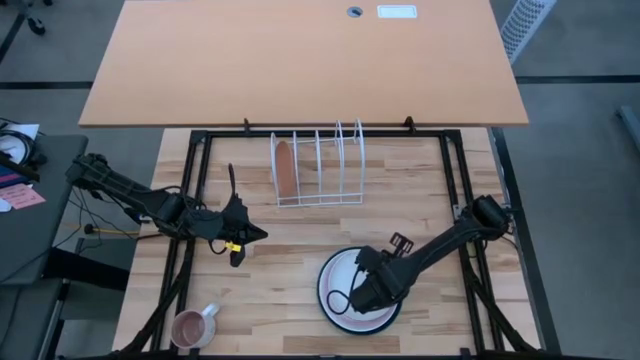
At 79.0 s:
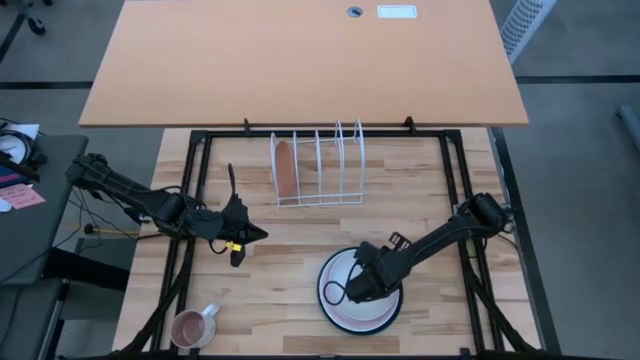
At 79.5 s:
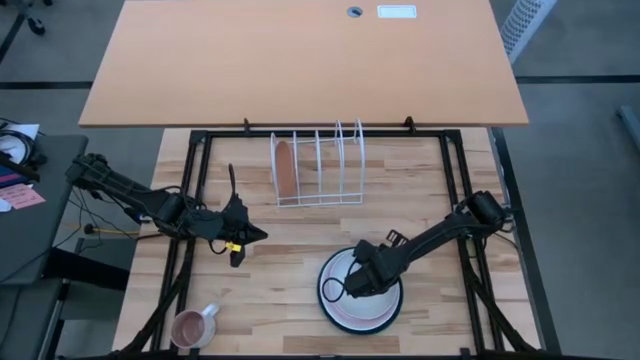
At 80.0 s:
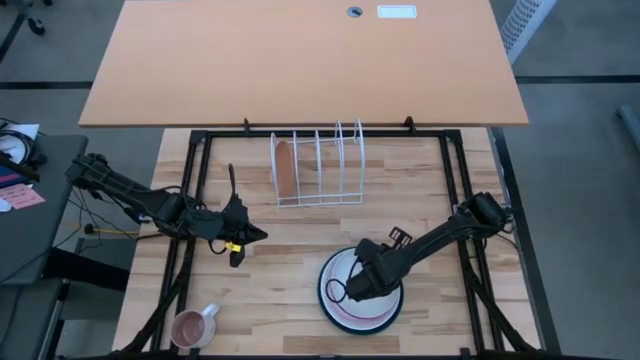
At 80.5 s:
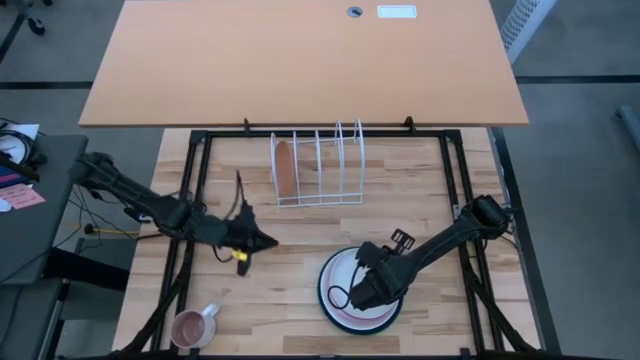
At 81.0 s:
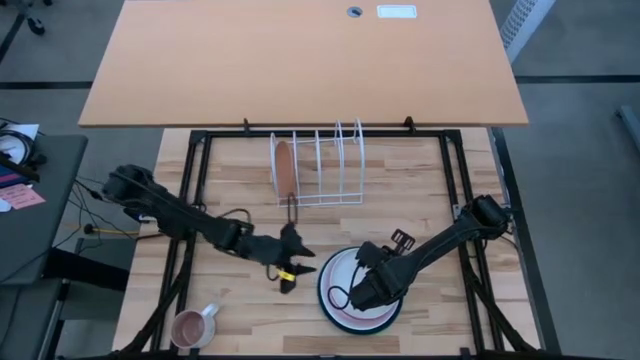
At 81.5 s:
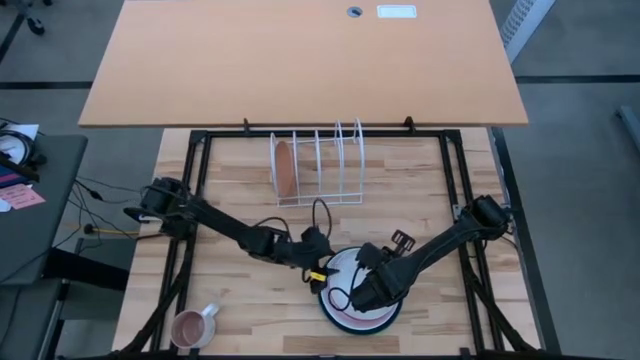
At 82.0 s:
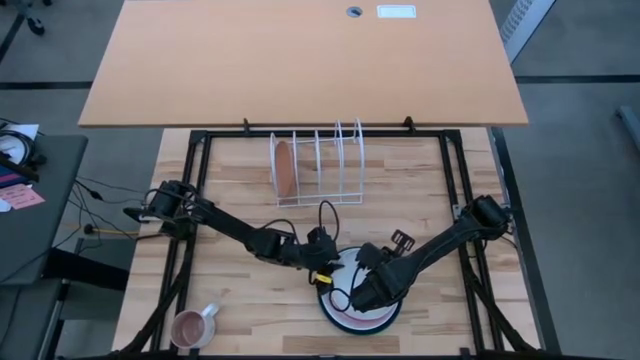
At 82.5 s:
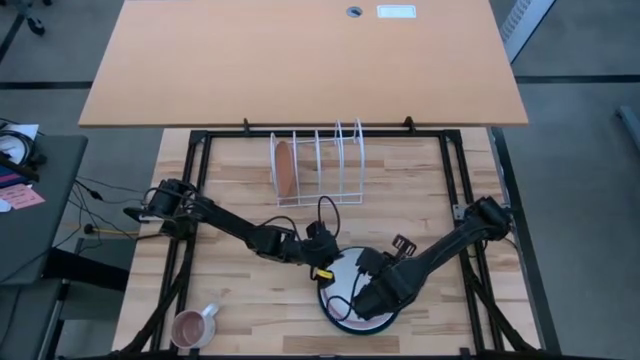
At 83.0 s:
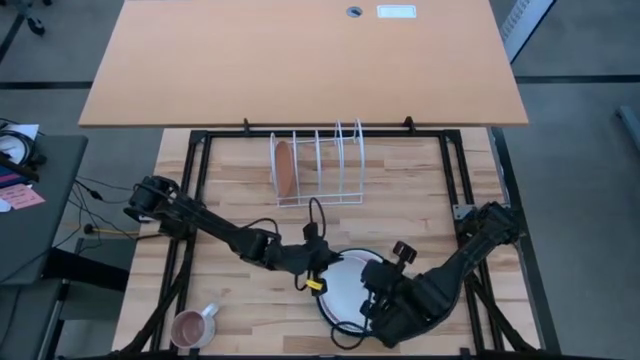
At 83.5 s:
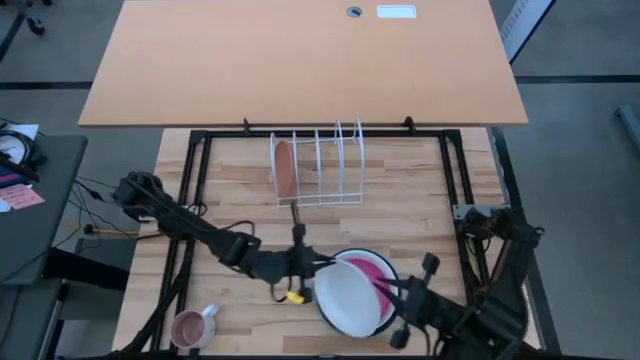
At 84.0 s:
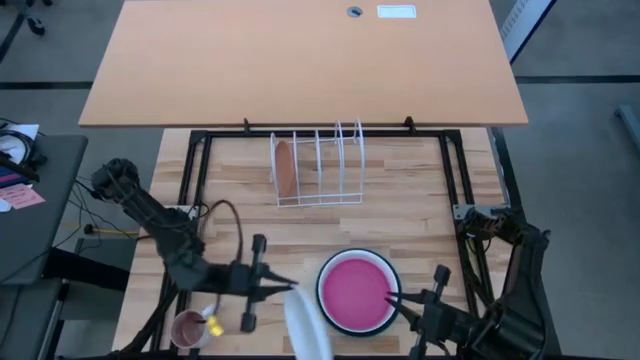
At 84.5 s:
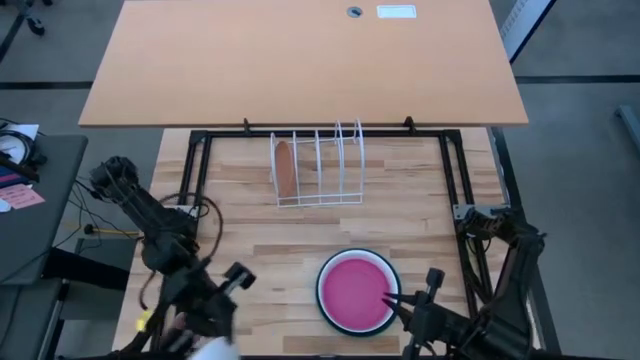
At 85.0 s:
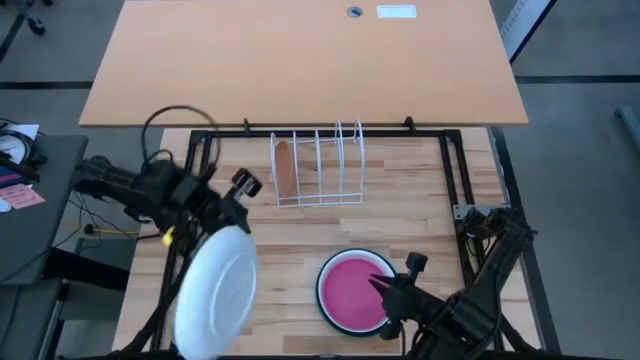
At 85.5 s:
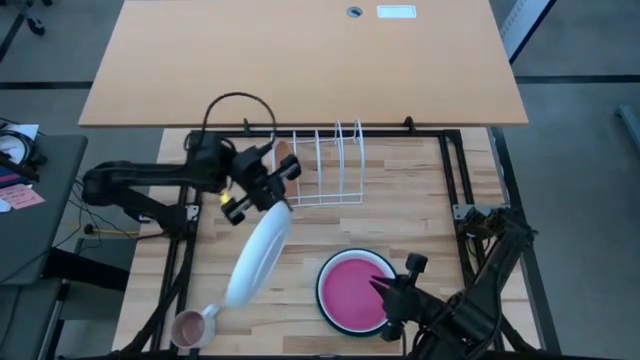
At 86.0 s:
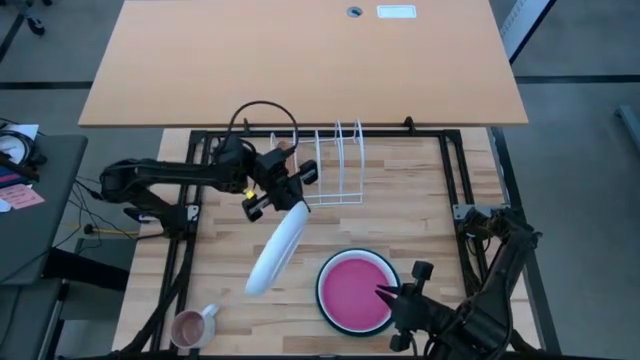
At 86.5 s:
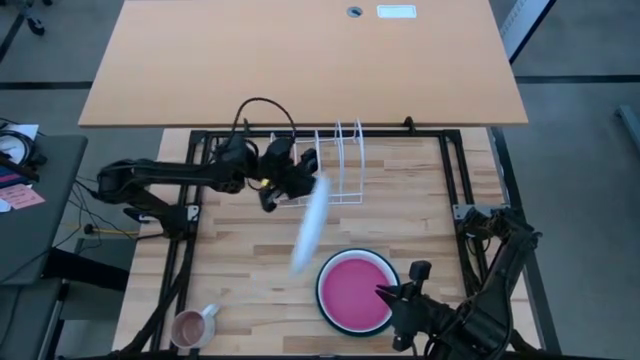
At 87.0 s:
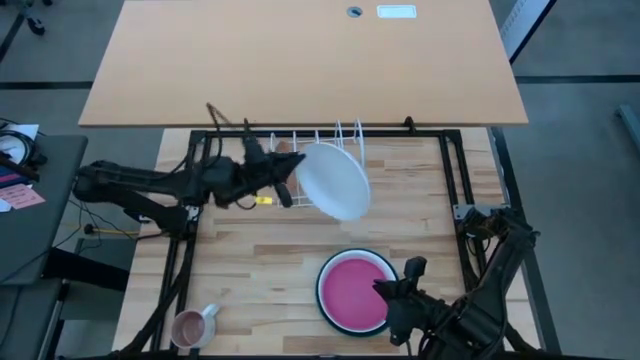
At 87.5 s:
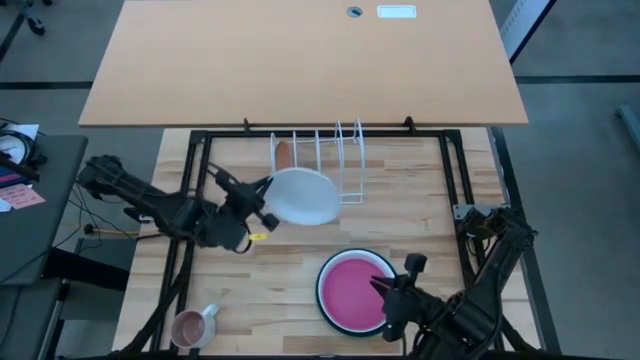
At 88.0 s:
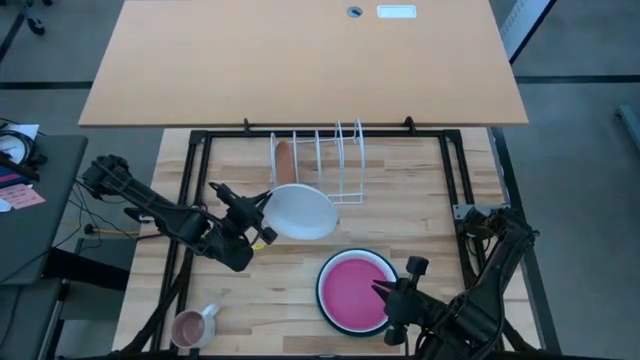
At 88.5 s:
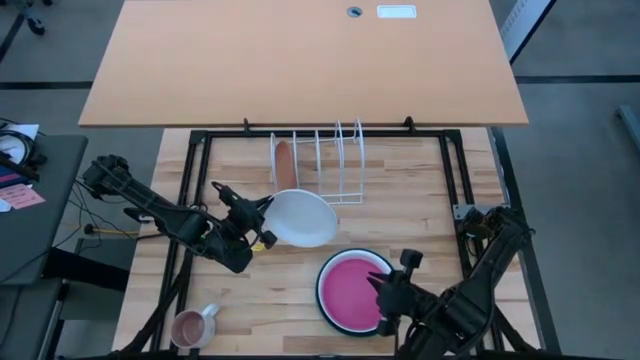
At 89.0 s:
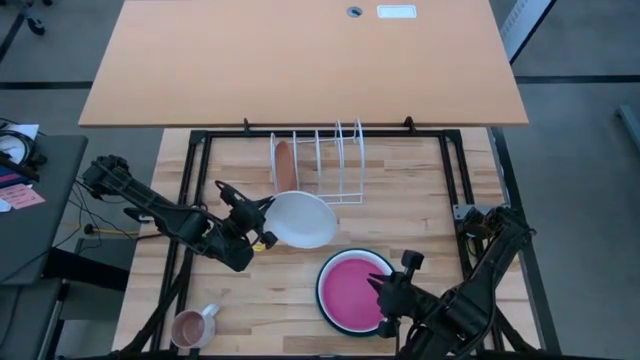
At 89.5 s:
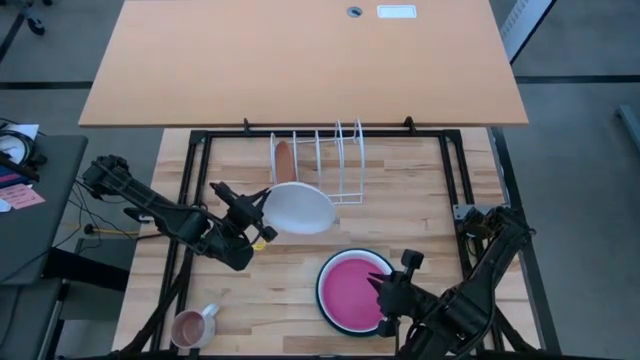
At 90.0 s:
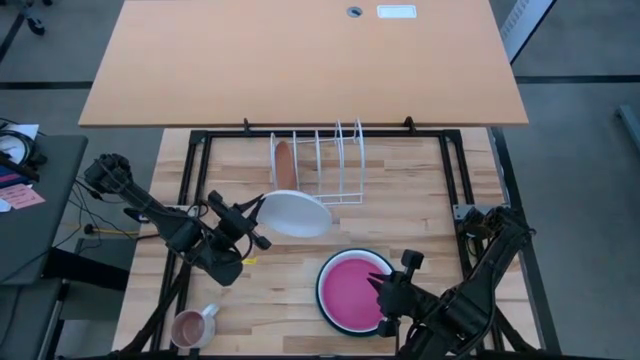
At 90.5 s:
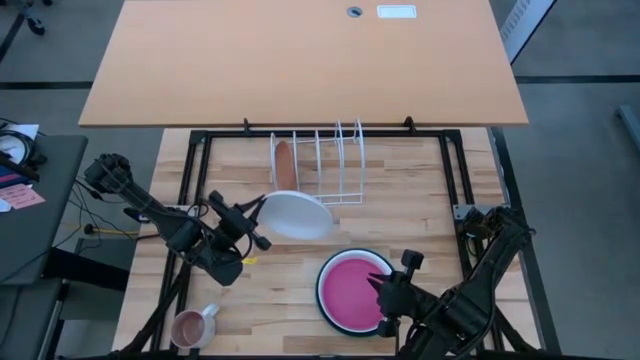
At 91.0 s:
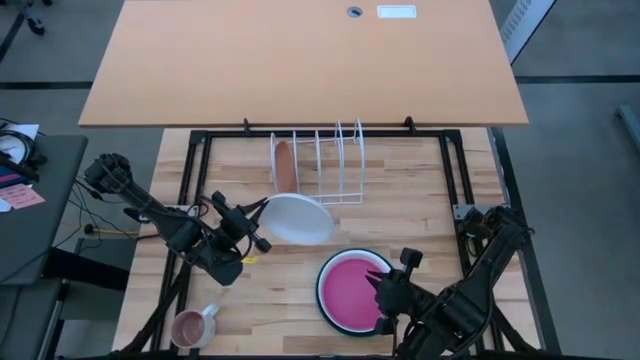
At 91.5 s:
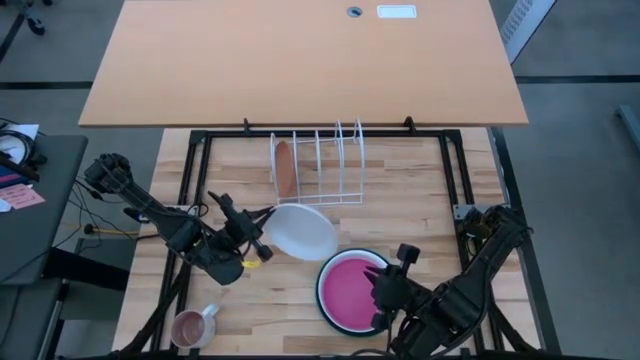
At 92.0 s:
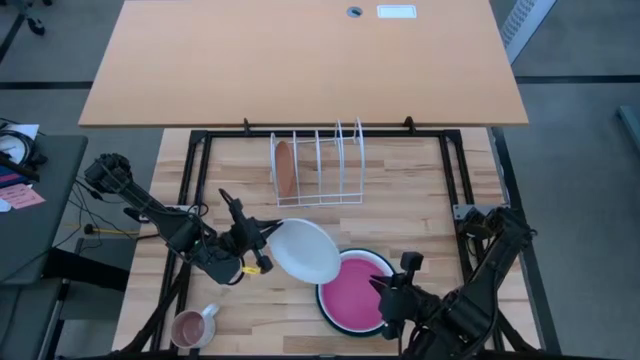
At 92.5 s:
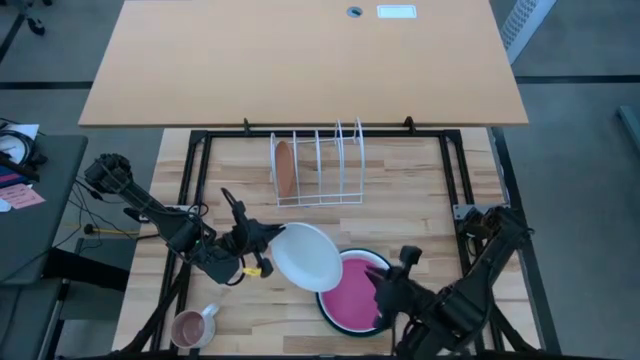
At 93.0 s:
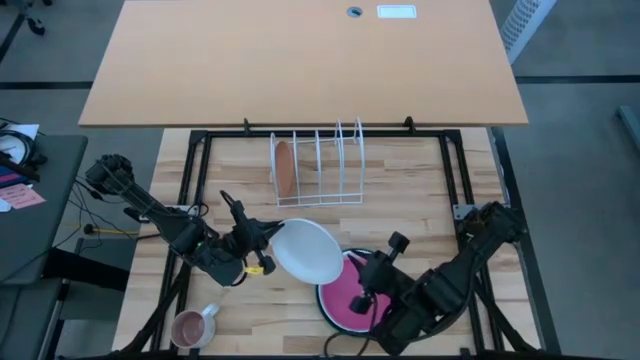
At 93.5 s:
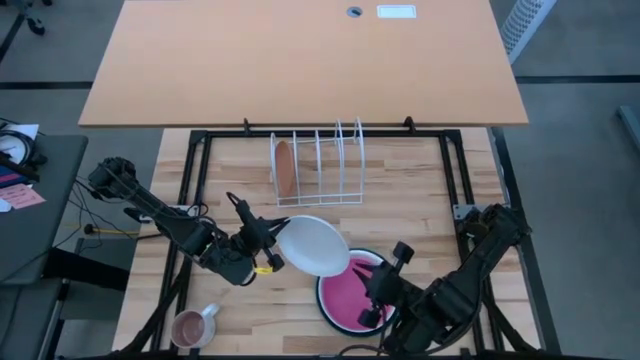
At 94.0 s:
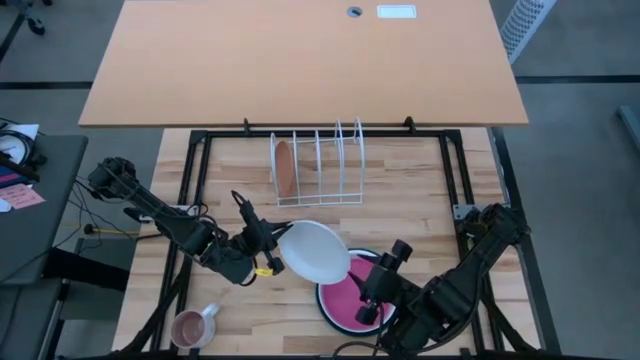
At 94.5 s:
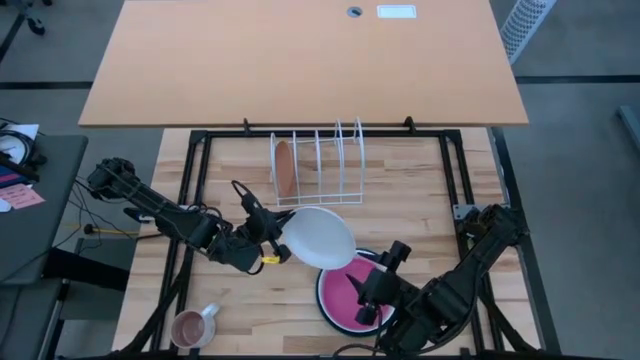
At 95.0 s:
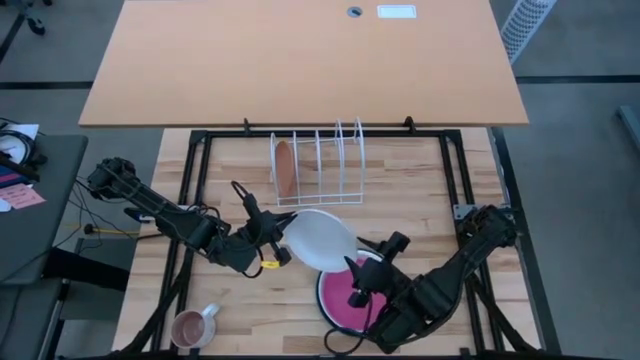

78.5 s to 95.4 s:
Task: Sort dishes
Put the small white plate in the dish rack

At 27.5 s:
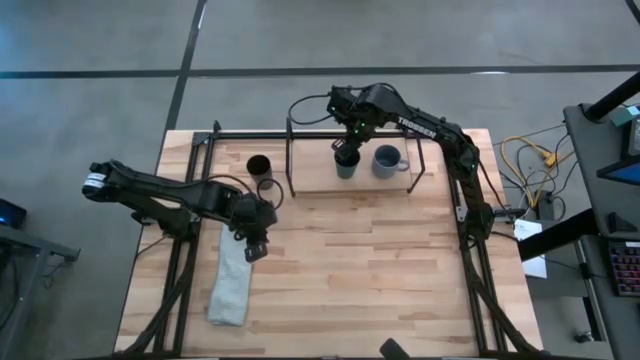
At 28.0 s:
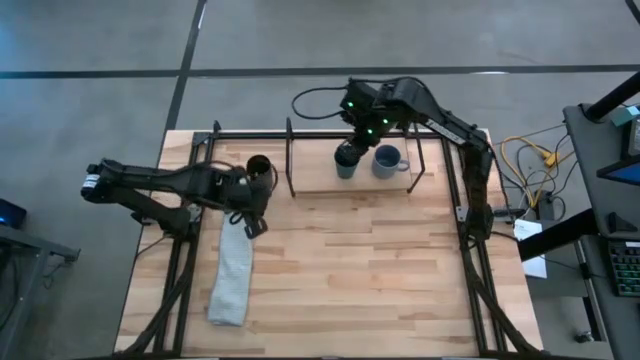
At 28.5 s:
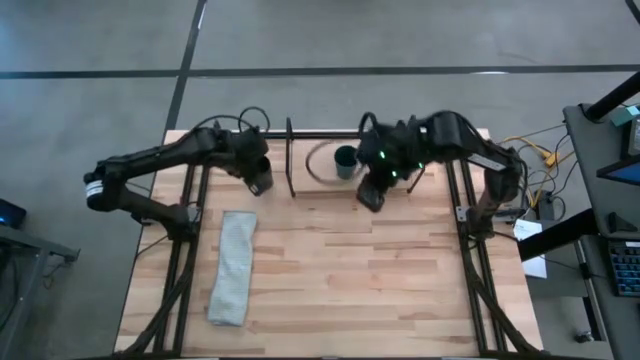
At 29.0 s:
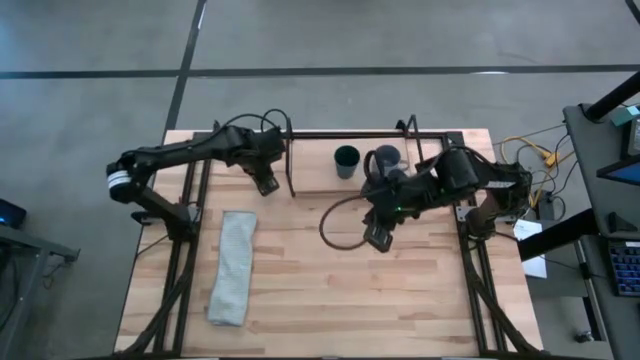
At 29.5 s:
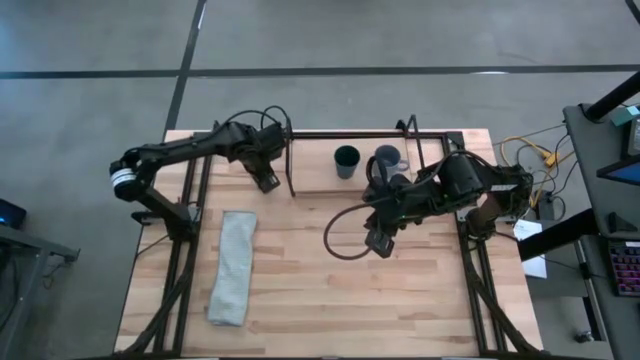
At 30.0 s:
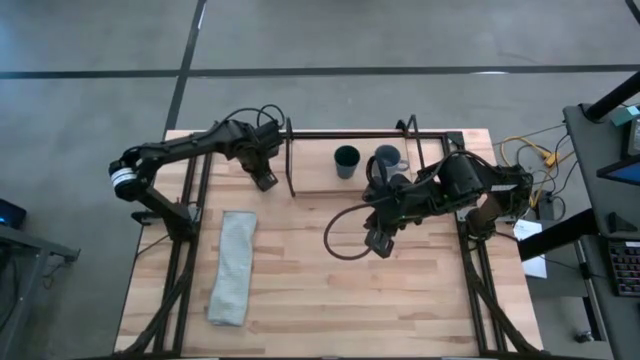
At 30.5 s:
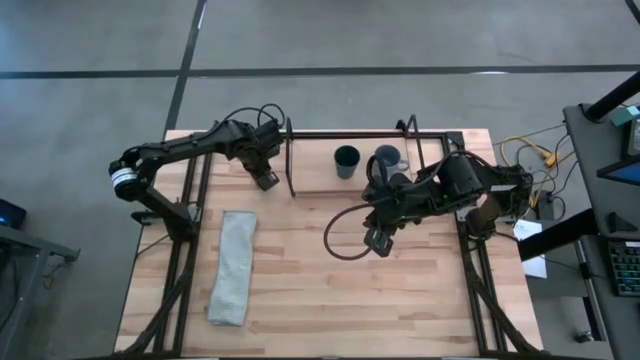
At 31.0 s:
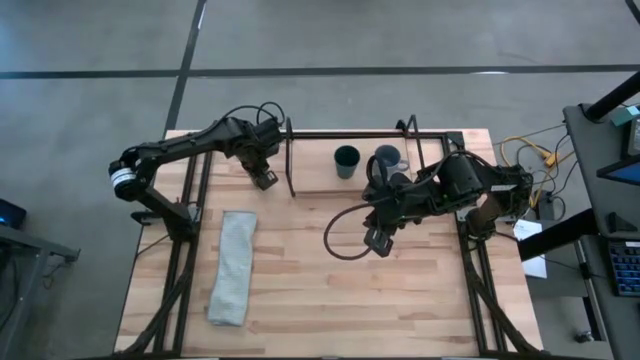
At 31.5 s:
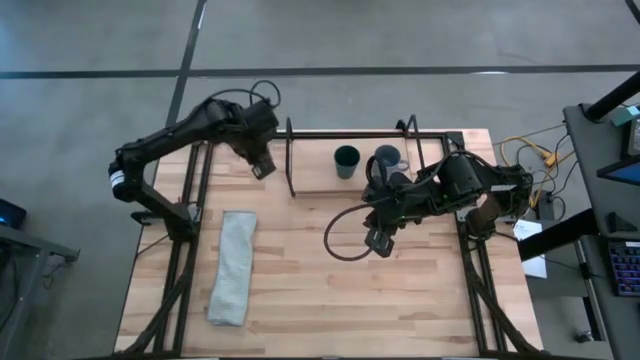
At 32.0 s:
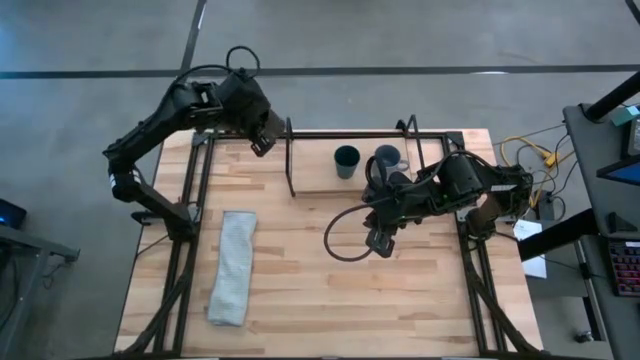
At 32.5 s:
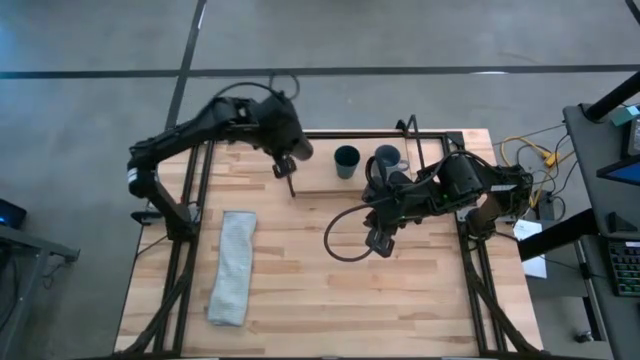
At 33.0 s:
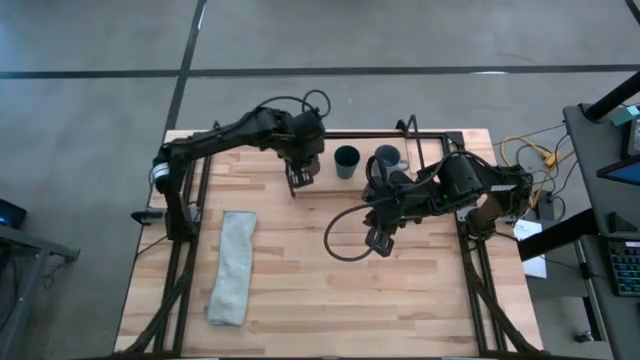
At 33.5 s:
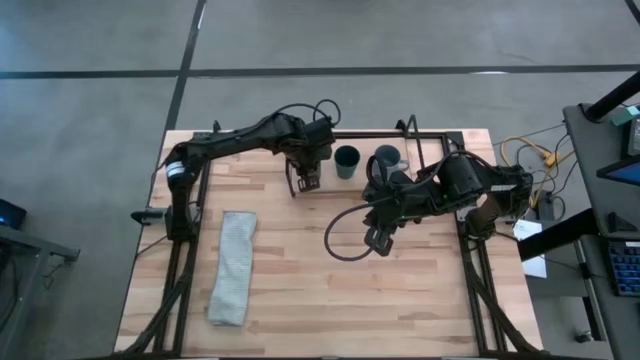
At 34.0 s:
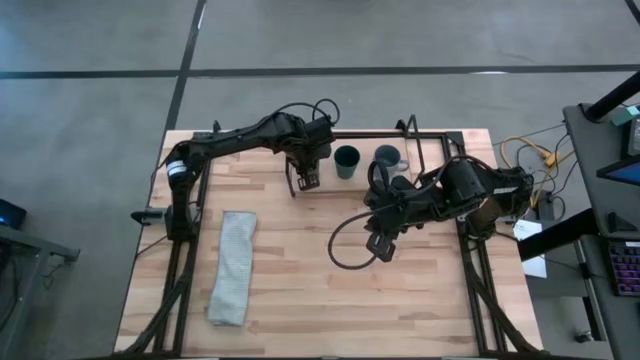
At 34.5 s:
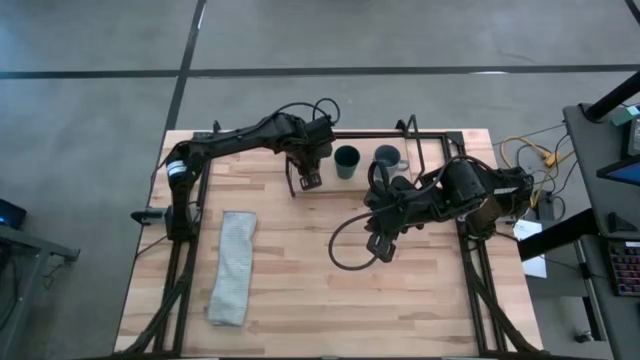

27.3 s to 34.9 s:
Task: Stack small to large cups/mugs on shelf
Put the black cup on the shelf
